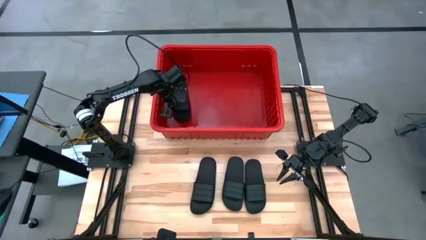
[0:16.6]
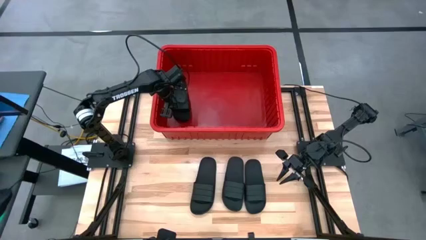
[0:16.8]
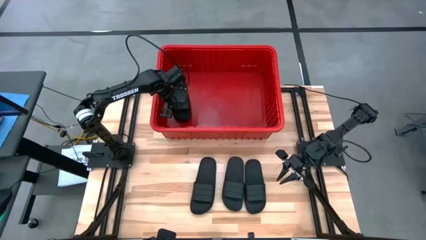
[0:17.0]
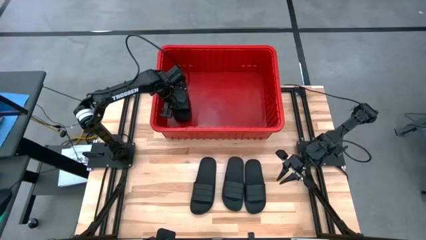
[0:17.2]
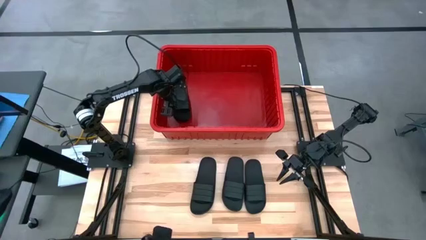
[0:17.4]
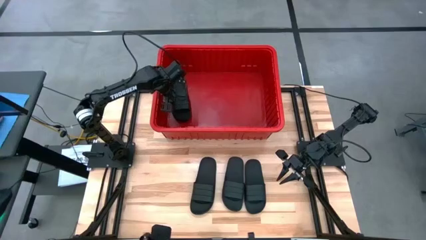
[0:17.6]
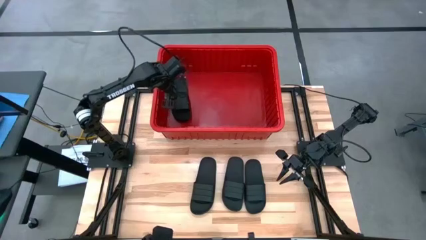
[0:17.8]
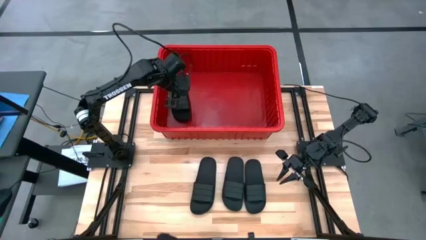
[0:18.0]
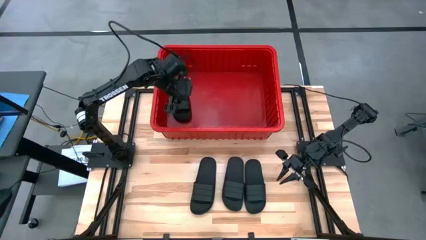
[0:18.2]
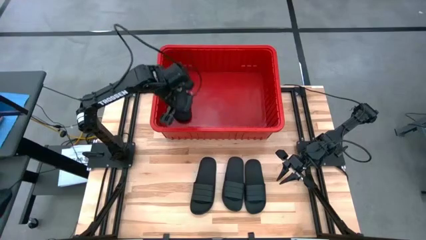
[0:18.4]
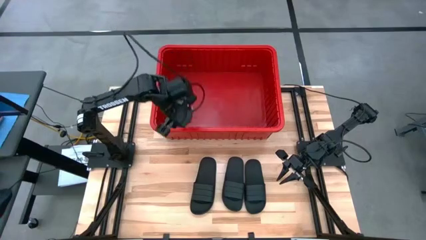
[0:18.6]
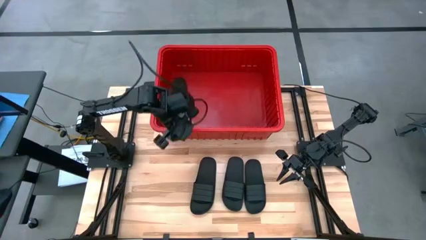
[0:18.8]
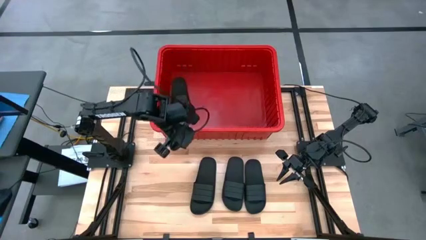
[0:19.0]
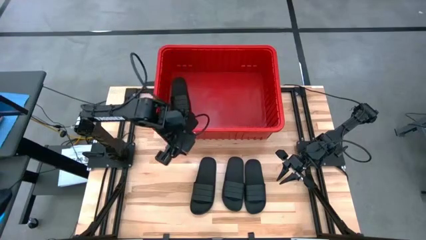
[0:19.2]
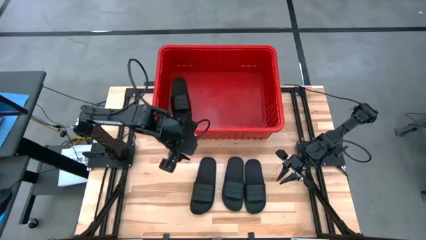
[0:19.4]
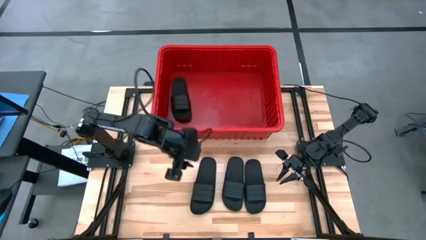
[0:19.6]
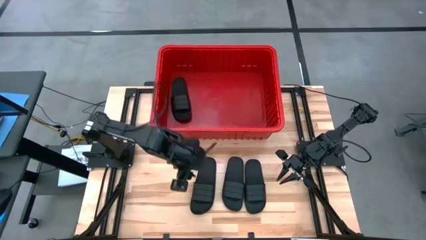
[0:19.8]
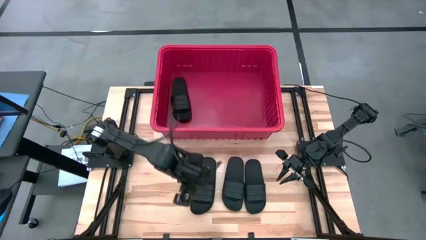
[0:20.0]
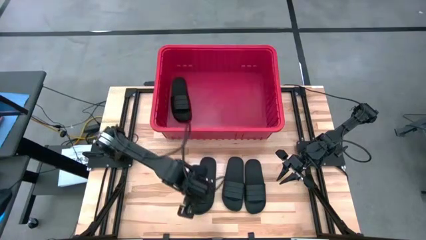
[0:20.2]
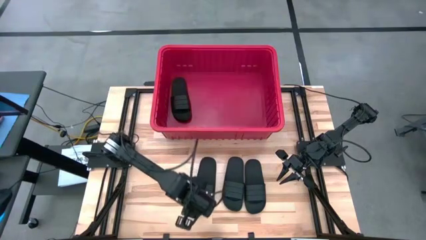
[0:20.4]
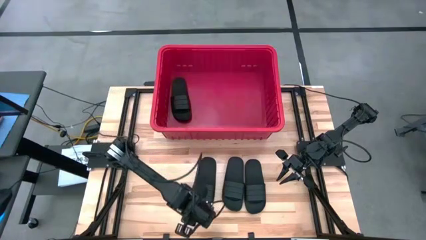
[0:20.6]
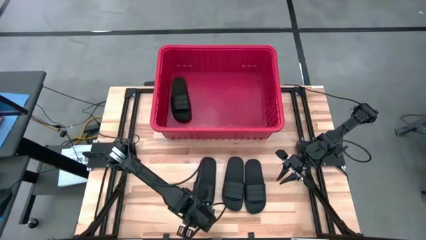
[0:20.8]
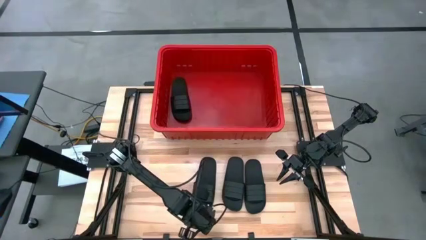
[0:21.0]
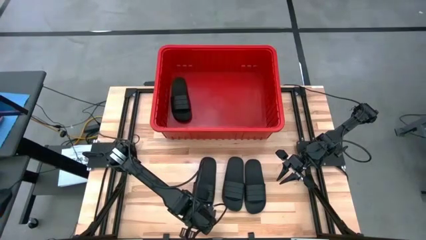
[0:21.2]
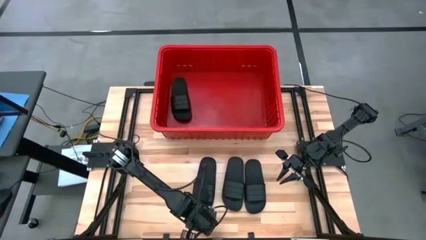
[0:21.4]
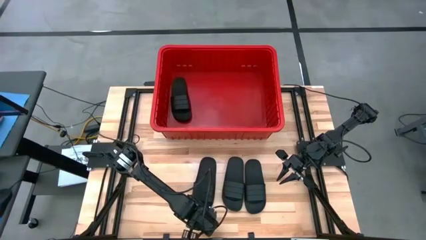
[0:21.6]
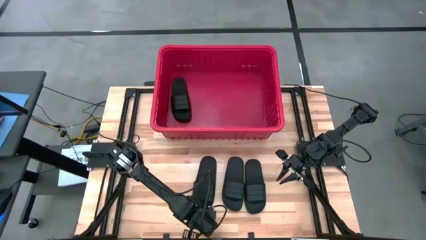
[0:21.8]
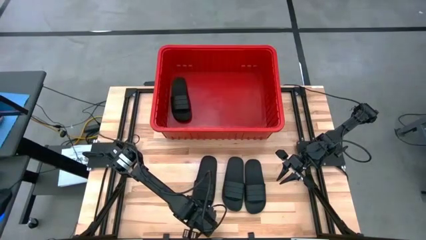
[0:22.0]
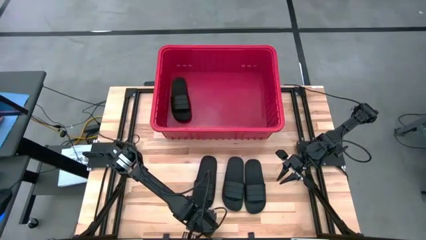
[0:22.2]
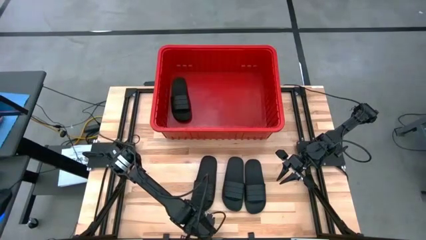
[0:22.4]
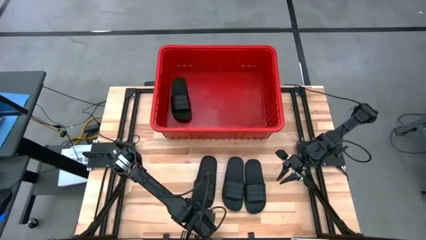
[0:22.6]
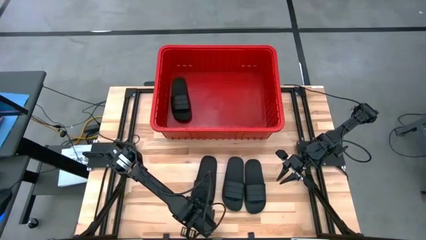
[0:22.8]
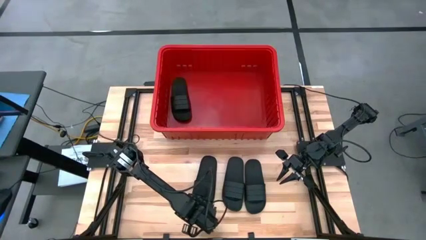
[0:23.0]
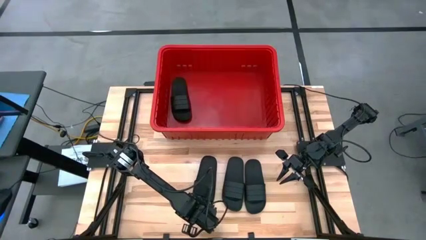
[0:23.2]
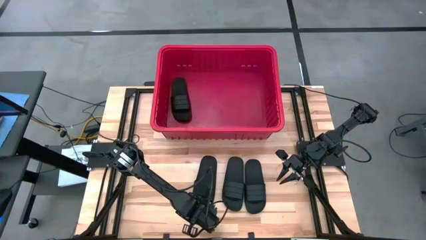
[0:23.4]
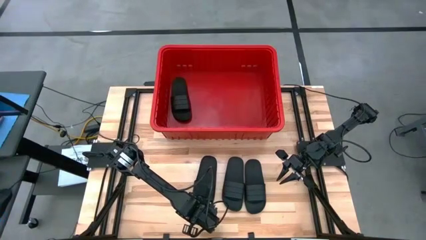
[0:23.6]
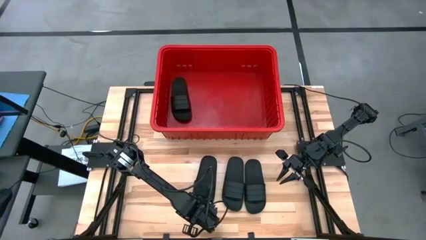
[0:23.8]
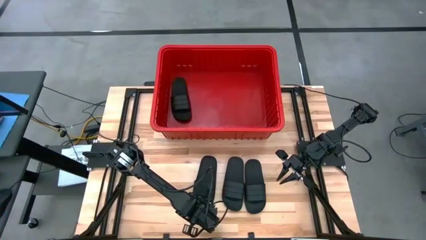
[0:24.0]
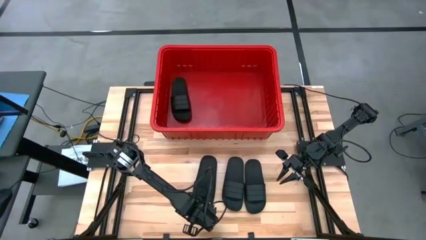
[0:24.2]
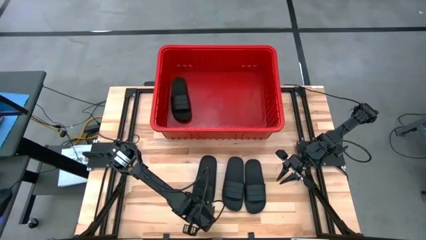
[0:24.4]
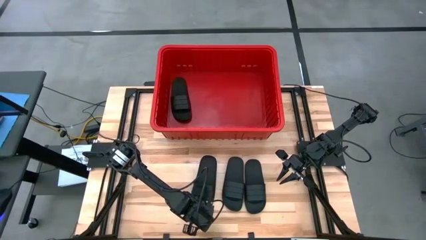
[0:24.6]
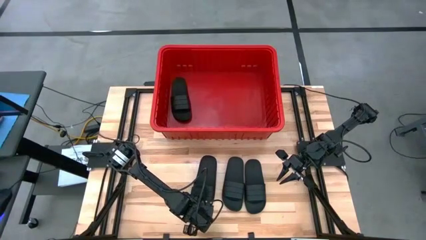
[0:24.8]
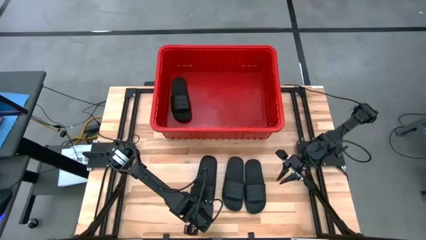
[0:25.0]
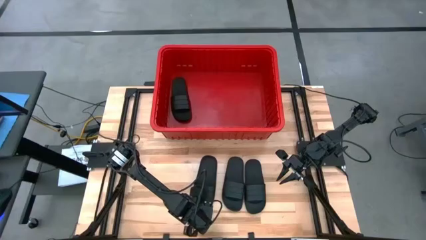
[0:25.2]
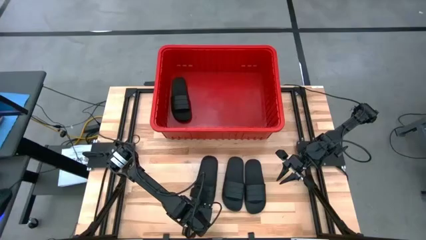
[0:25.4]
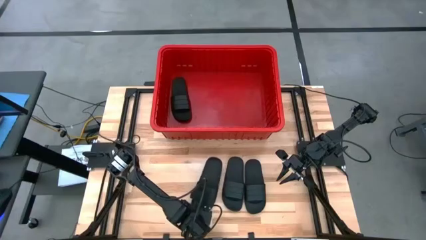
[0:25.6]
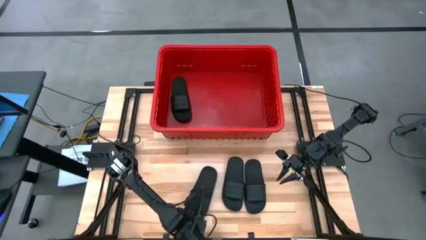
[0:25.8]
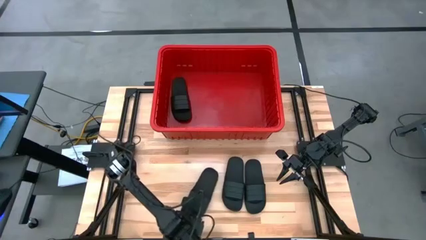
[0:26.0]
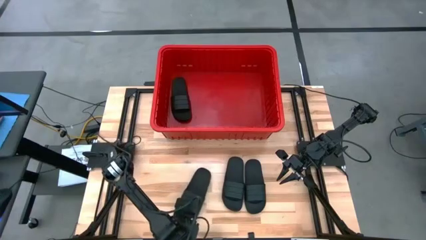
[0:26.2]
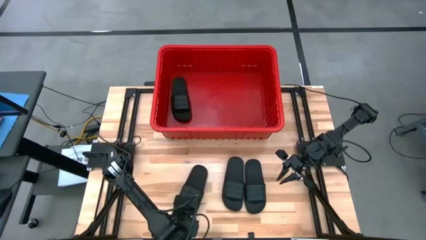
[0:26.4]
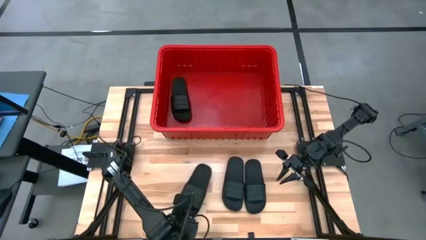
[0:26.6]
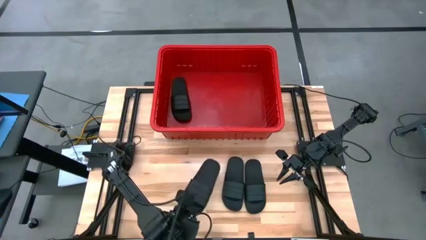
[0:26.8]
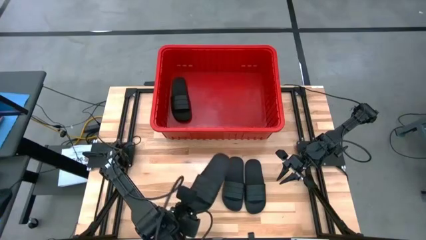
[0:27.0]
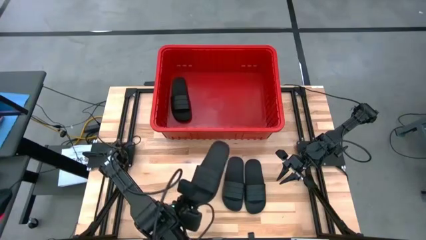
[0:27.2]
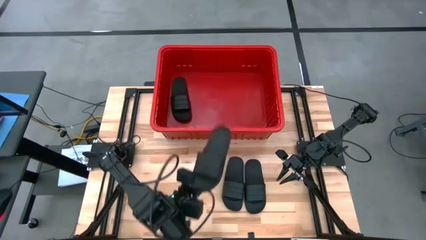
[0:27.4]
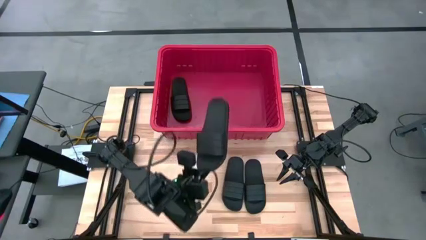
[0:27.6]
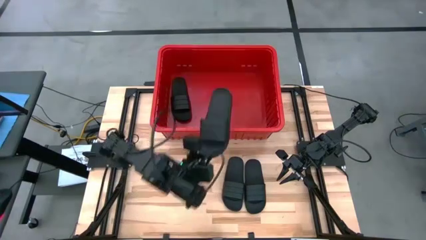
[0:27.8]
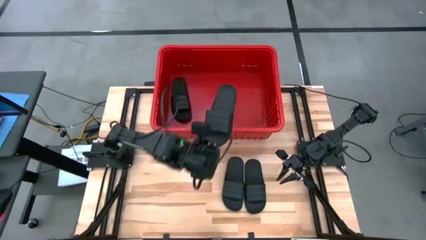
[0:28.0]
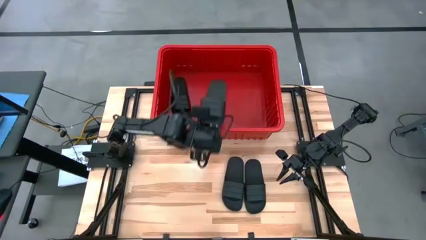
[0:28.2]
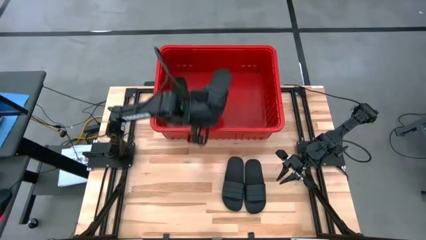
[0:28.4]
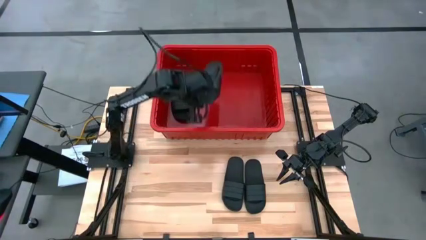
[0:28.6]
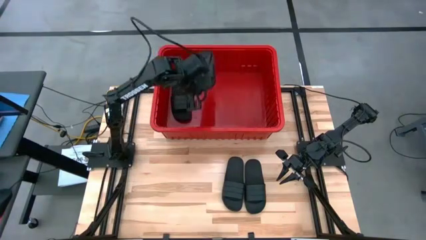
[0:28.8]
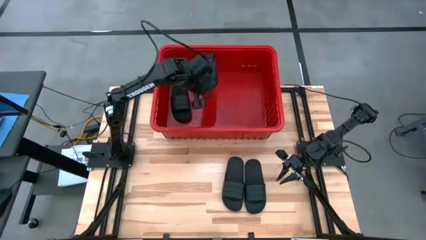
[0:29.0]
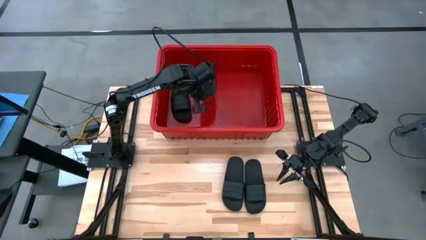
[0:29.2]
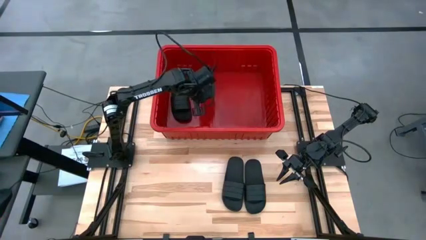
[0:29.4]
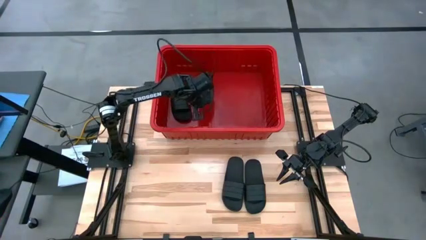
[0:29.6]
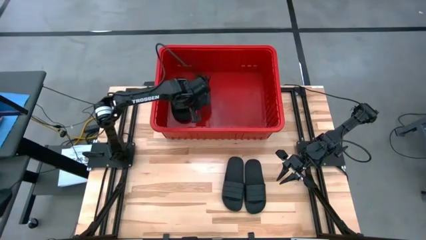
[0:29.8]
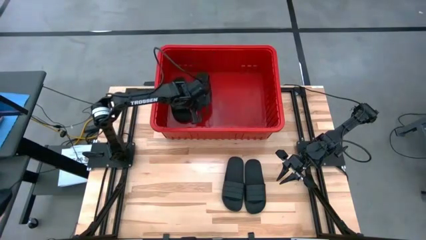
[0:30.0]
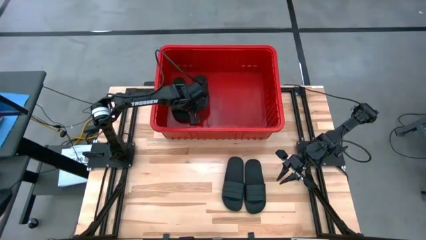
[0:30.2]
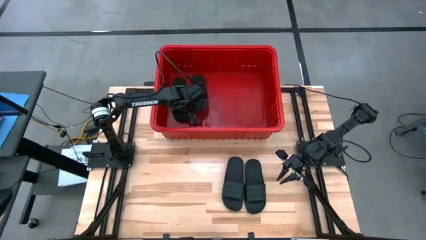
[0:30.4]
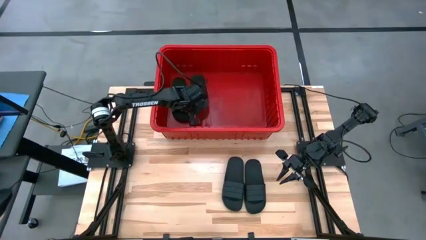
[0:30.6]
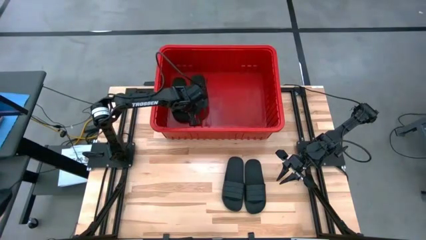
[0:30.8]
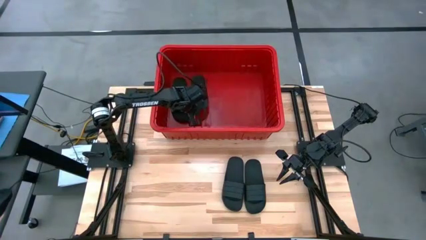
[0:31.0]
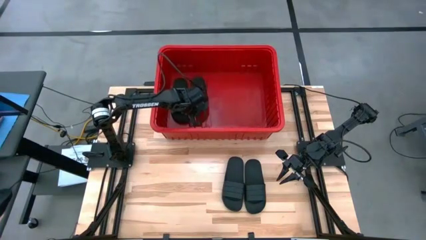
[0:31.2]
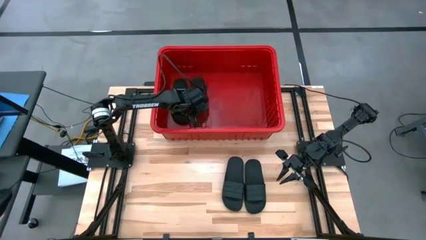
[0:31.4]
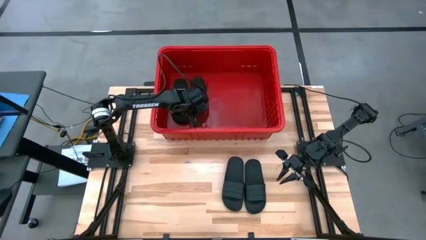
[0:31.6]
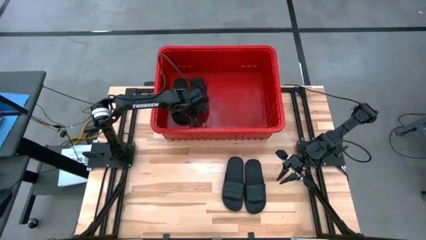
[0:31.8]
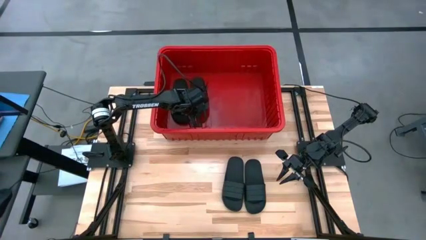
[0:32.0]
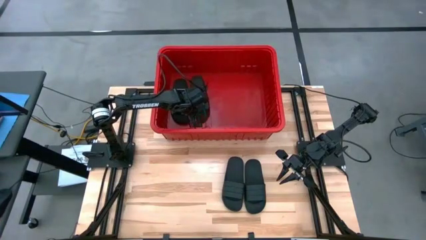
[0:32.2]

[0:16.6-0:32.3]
Task: Pick and place slides into bin
Put the left black slide into the red bin
